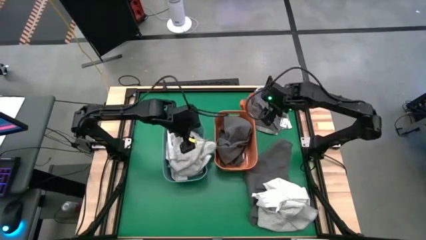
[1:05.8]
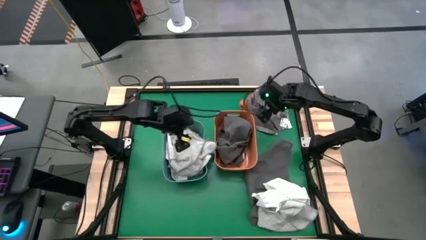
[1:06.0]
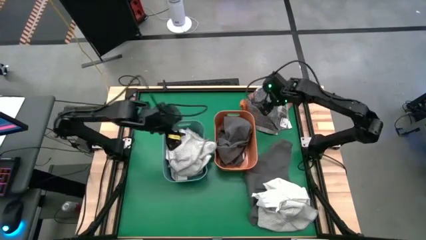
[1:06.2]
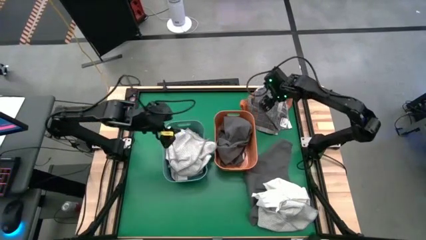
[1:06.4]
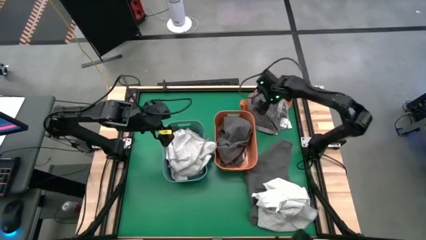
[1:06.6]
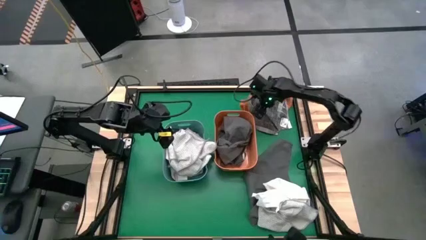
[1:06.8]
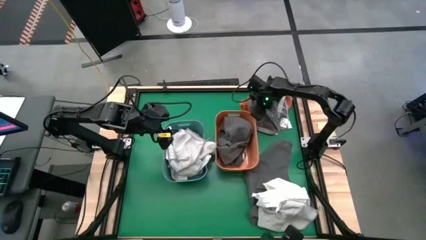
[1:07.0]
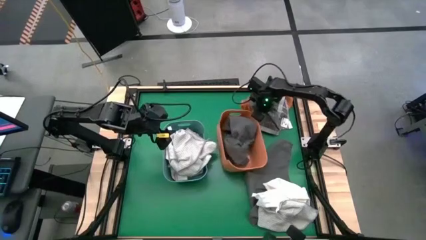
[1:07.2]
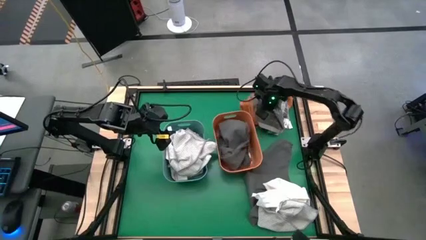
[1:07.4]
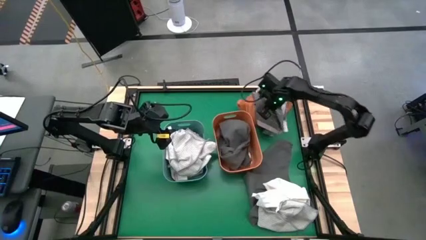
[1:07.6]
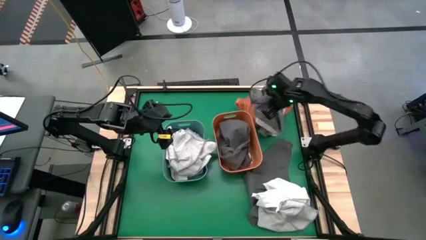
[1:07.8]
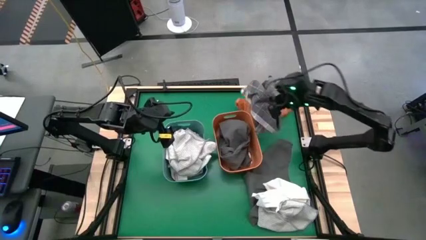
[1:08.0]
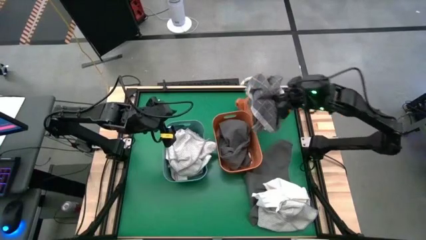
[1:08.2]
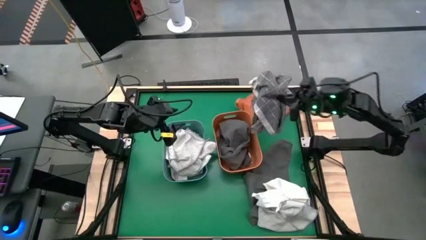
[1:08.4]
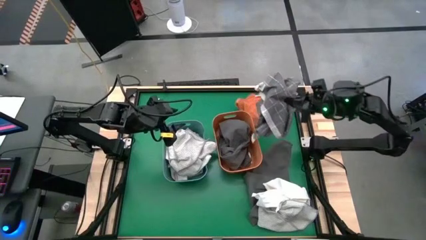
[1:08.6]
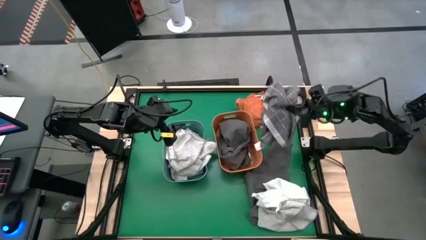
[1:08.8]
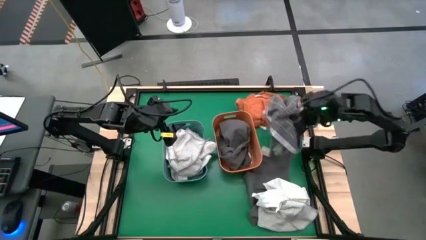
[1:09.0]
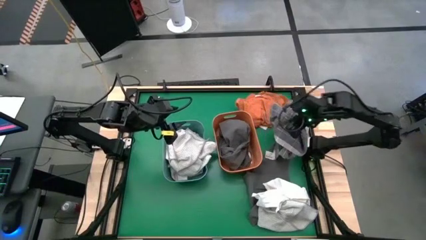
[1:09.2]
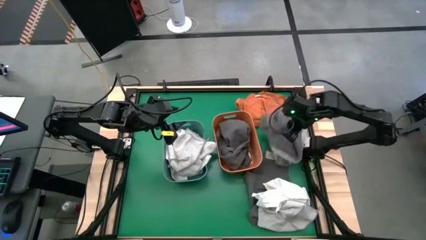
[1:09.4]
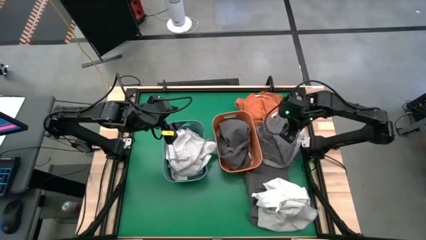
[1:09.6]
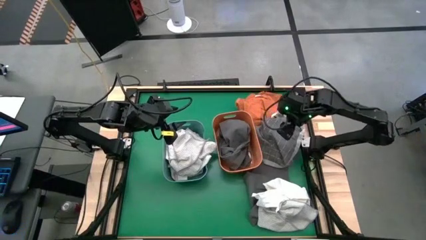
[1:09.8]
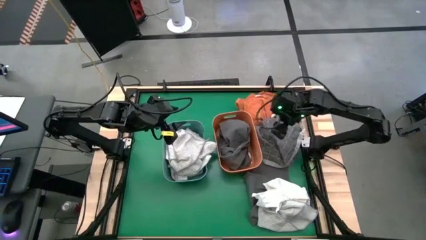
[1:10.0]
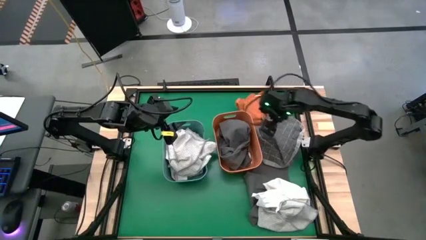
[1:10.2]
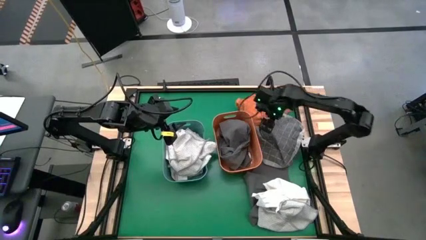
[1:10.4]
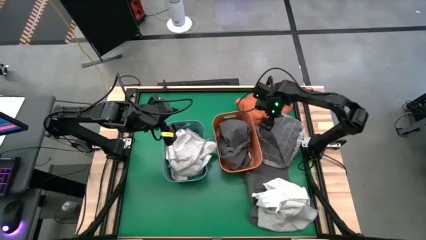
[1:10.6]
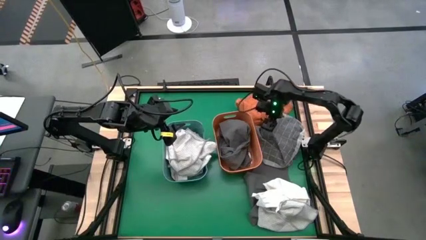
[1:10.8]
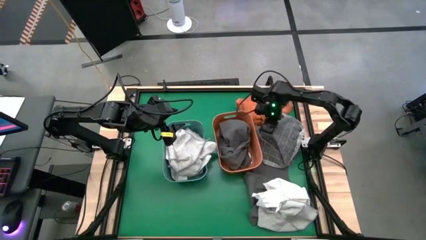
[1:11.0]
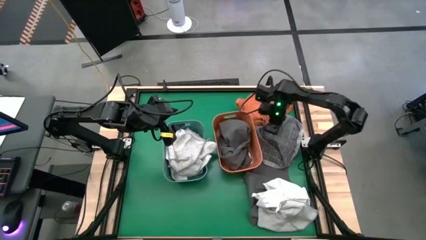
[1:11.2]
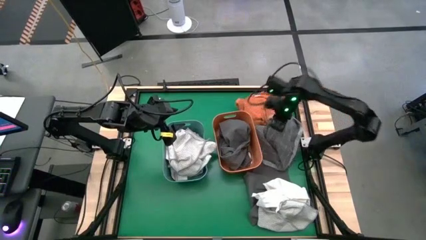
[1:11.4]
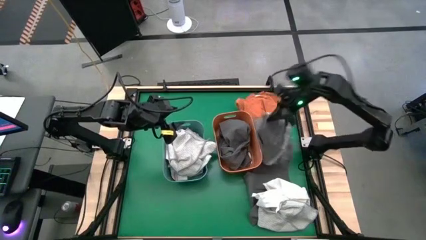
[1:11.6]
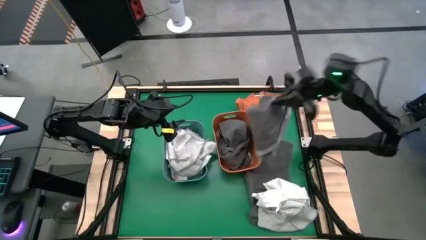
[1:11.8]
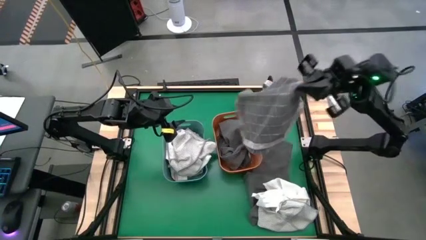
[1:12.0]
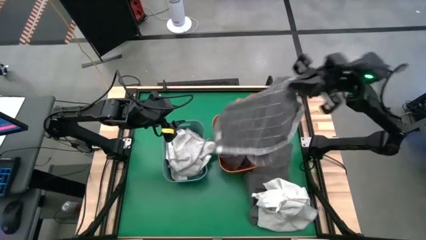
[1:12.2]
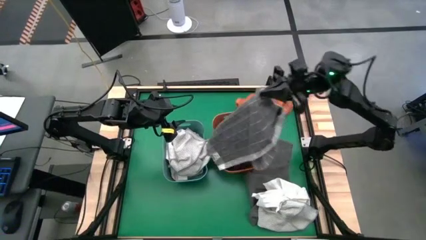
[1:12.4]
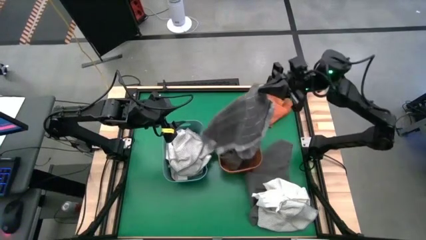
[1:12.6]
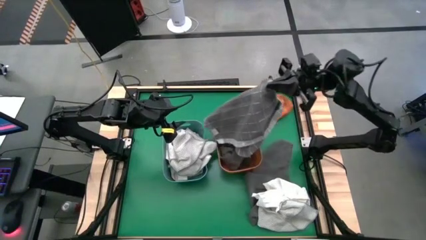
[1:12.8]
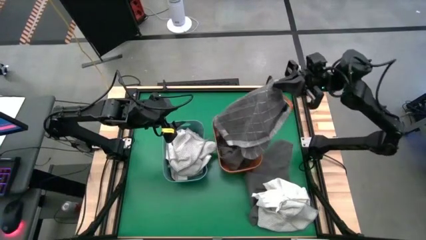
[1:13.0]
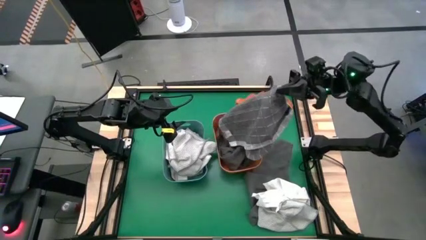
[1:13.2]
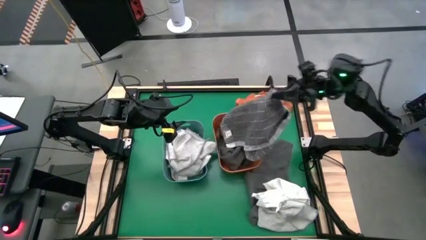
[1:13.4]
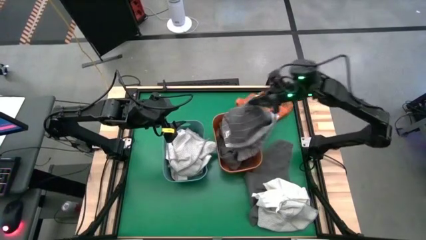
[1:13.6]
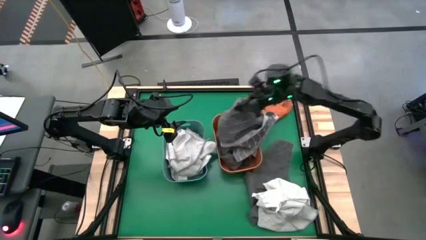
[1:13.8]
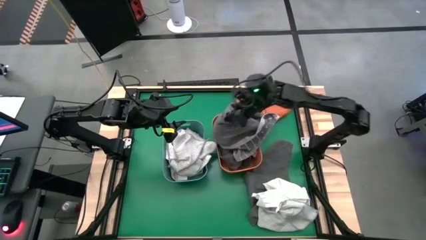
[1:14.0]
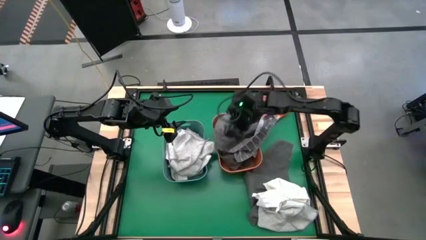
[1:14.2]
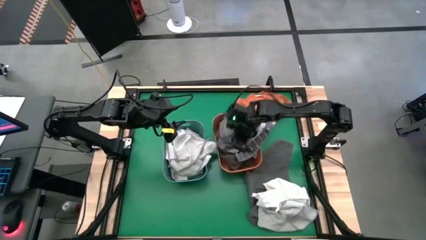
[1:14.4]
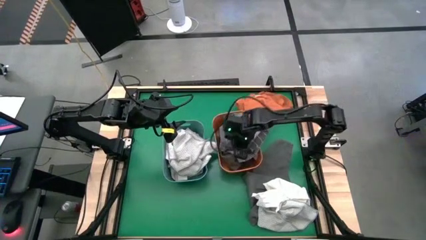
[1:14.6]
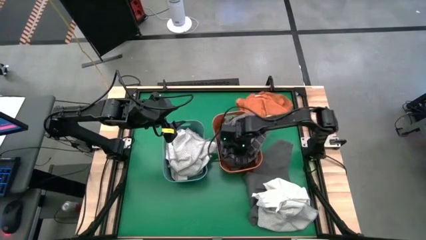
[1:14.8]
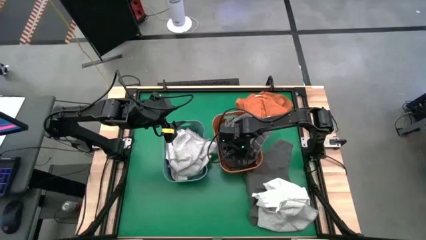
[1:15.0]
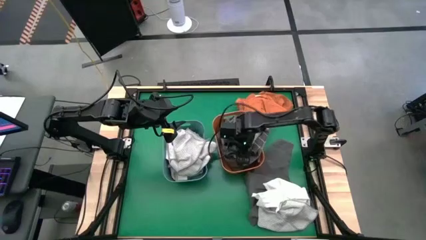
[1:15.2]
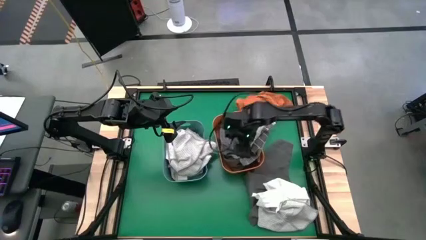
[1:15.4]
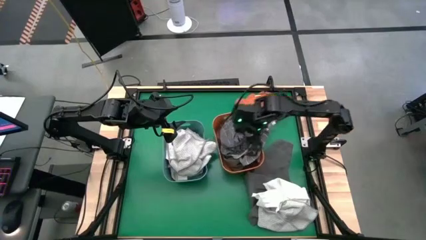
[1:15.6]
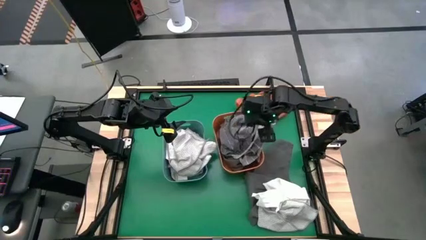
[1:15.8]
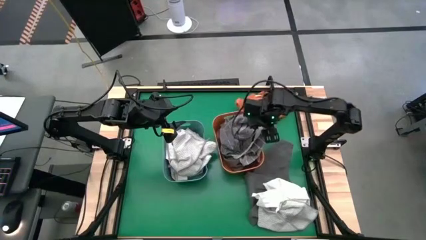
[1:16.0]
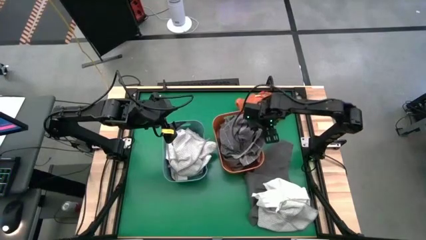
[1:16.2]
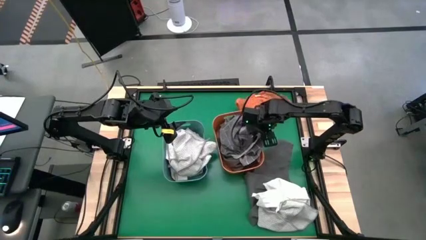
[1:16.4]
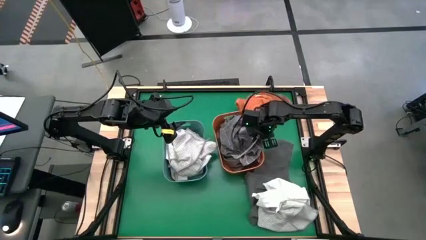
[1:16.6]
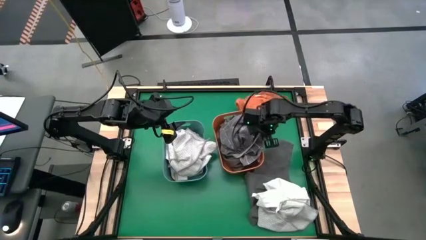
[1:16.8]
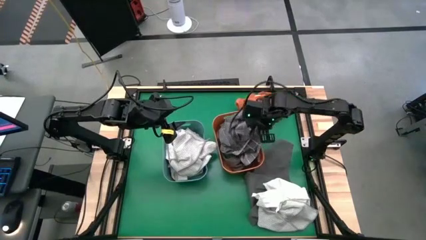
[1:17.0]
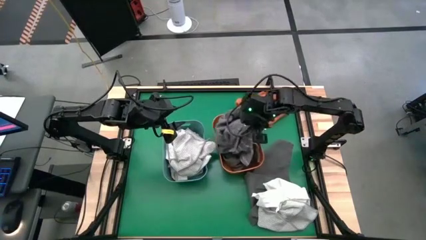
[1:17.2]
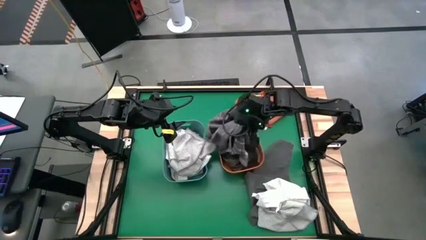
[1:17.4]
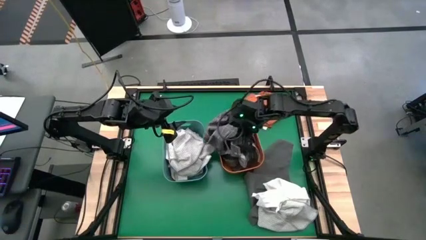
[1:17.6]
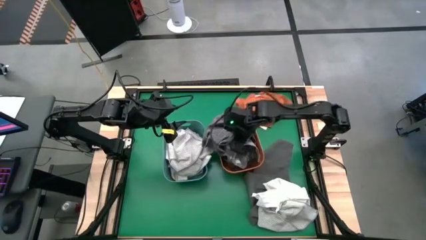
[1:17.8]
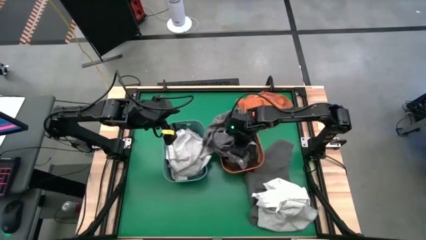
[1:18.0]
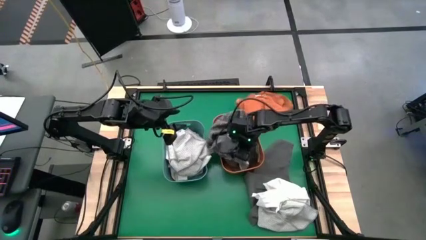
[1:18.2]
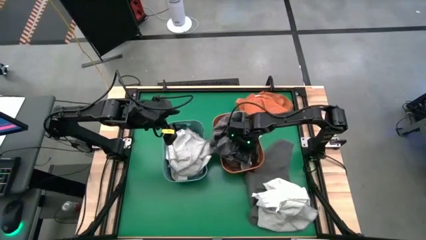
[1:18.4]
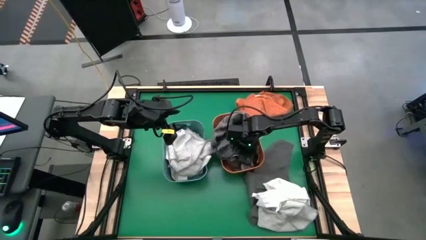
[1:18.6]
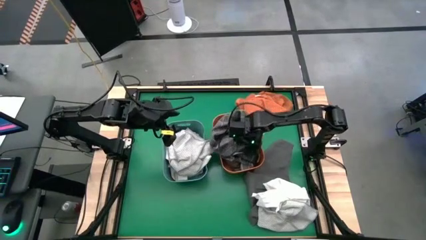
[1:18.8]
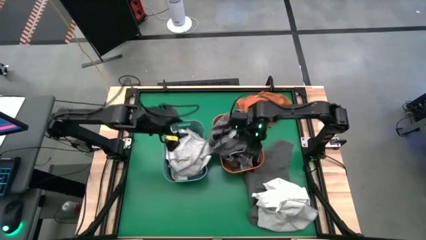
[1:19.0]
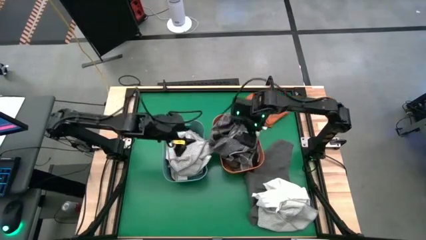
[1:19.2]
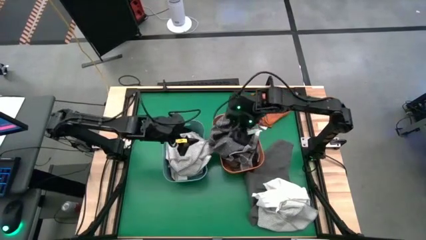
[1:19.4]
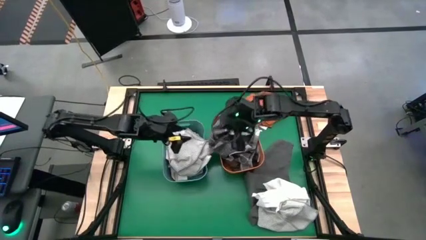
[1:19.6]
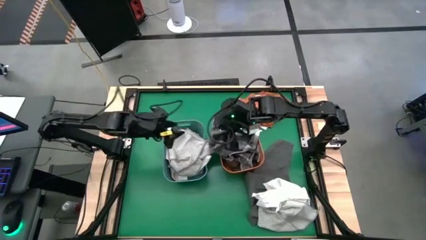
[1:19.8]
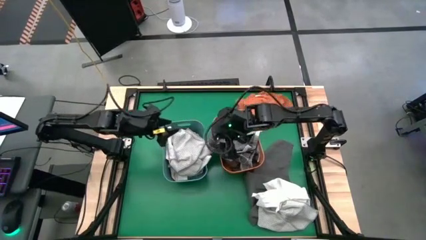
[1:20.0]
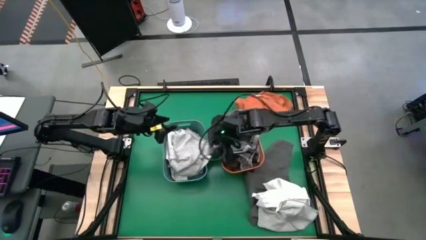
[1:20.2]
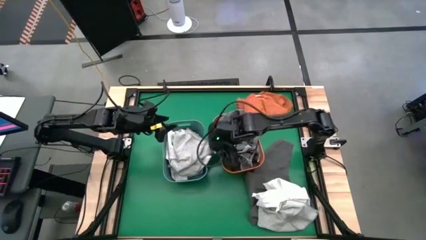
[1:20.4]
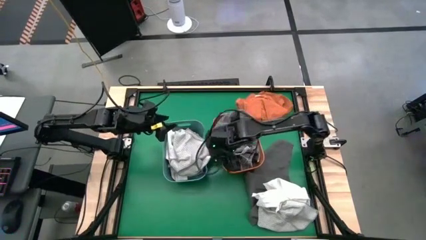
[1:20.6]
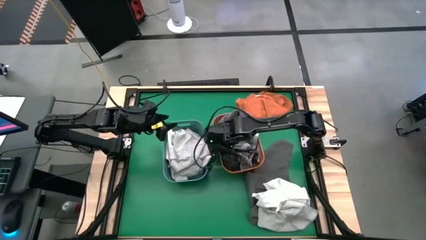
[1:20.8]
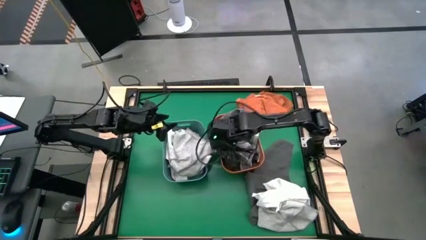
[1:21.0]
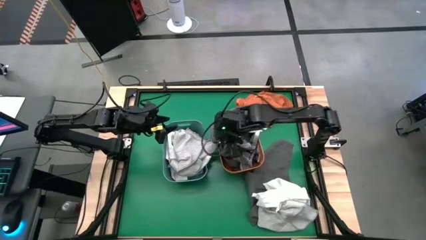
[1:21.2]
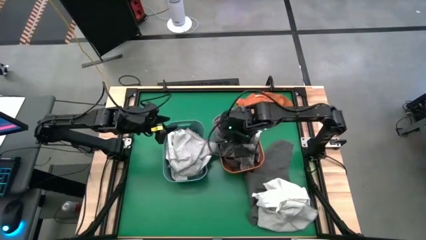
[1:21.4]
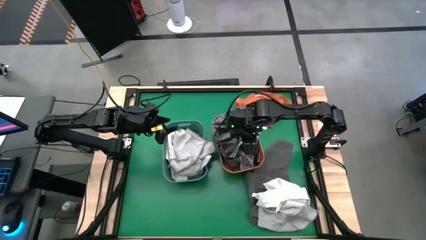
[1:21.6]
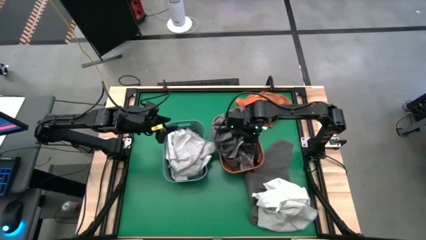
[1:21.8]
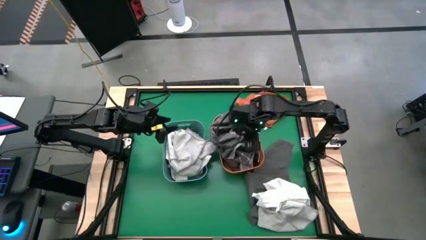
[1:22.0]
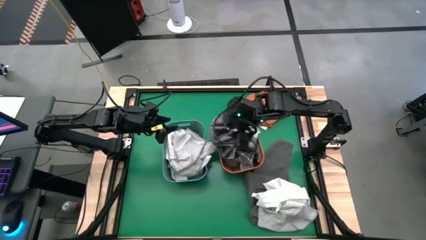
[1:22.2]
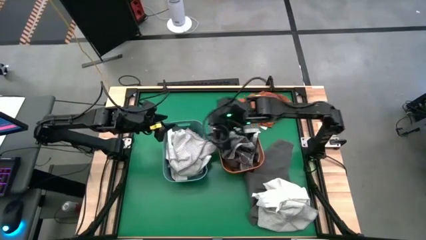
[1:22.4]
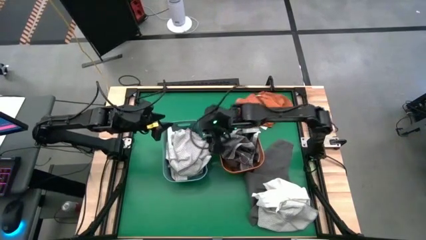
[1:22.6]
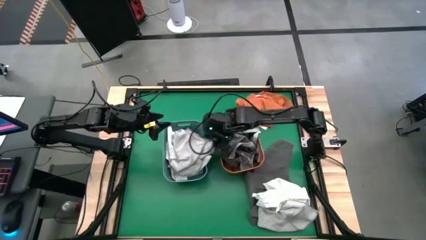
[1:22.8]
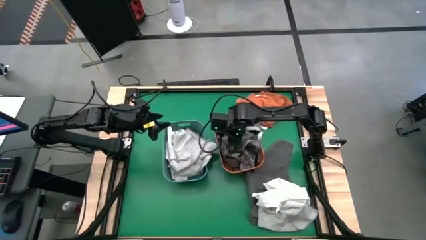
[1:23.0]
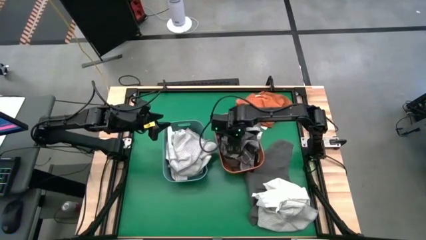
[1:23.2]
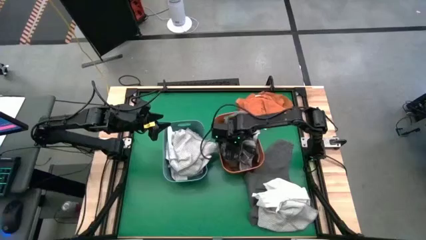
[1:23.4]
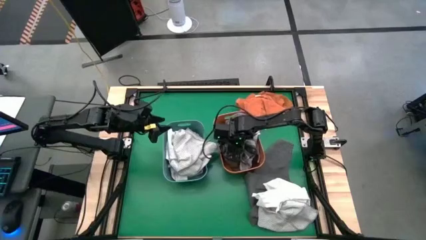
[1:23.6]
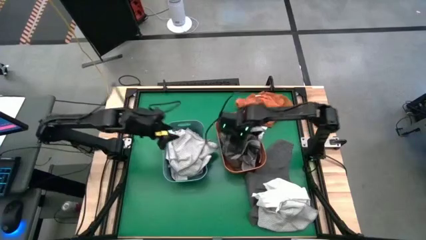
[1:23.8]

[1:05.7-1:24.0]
Task: Sort towels by color in basket
Put the gray patterned towel into the orange bin
